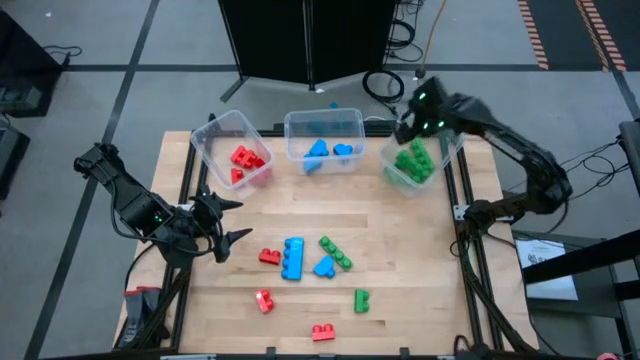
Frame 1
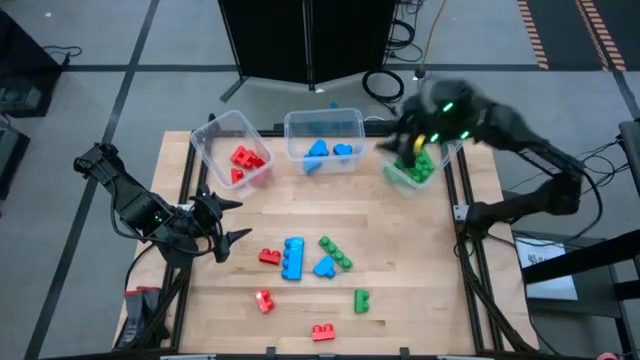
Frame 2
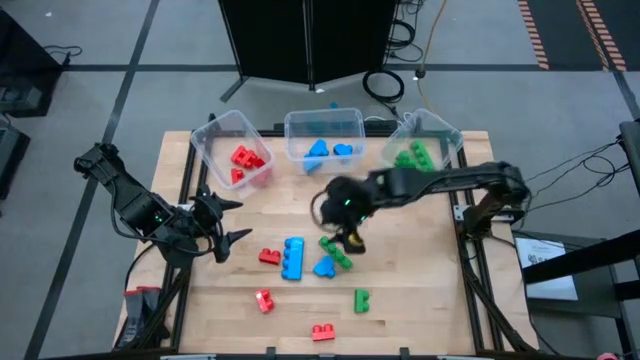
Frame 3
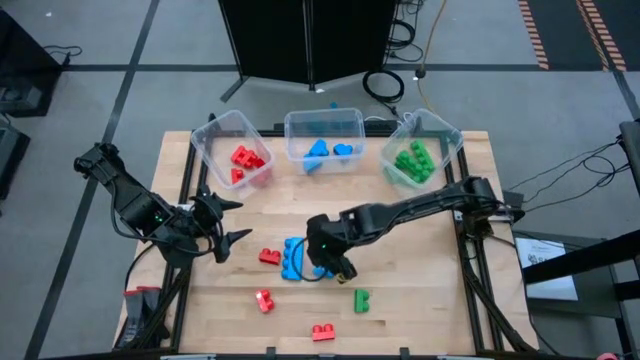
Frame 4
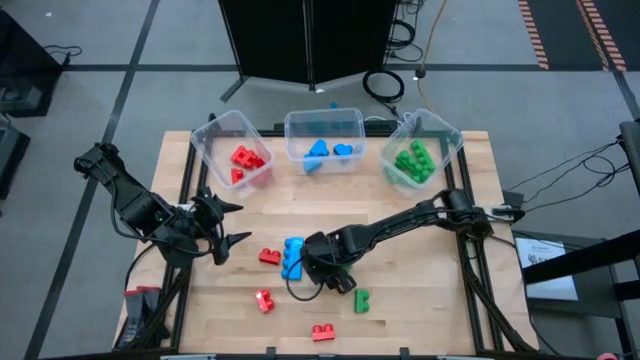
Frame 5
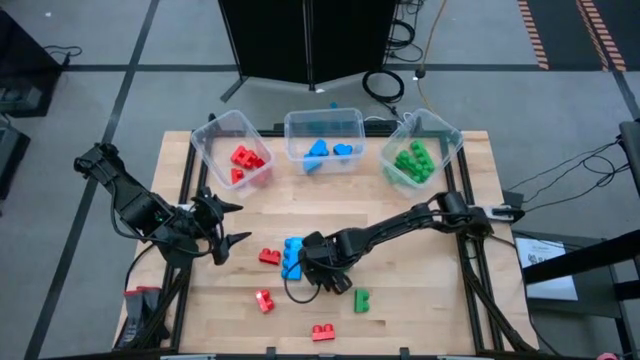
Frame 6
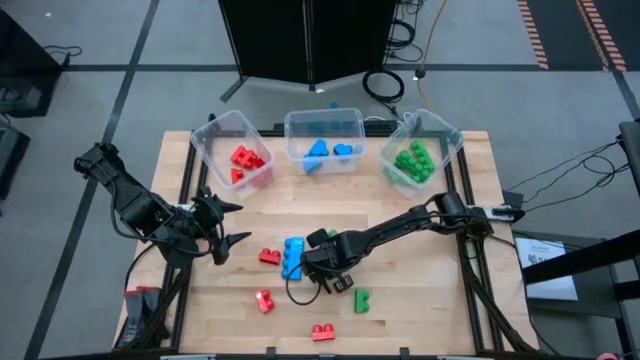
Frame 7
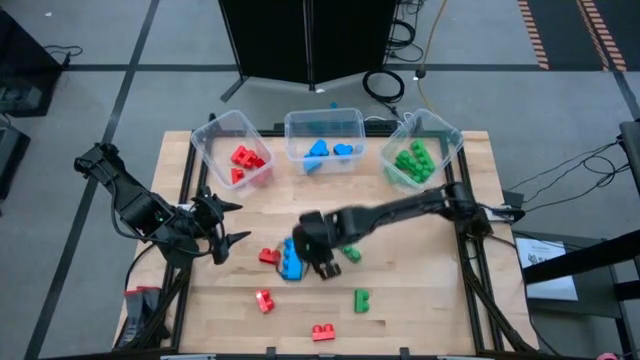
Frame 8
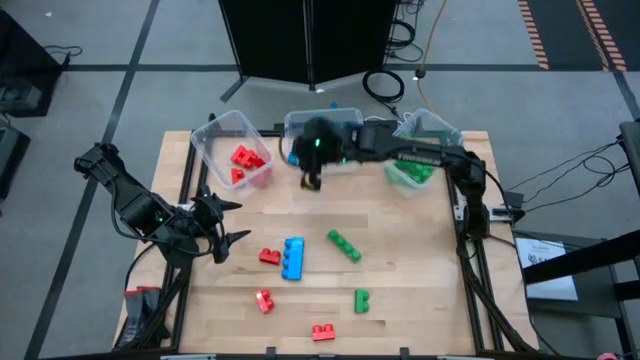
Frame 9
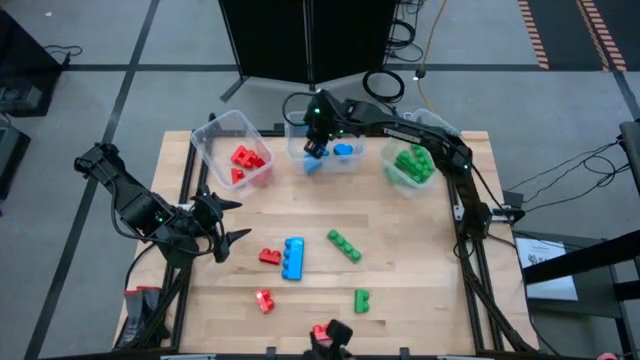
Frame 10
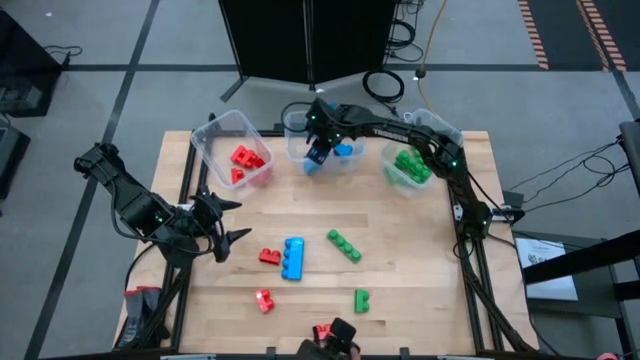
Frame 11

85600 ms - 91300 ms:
Task: Sort blocks
Put the blue game piece into the middle transparent bin

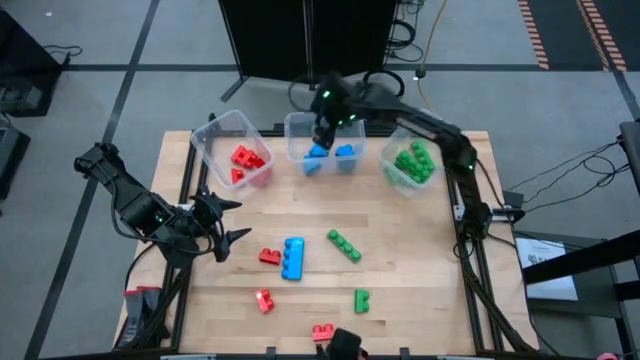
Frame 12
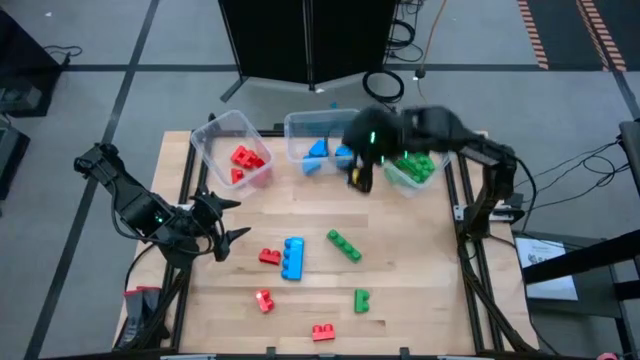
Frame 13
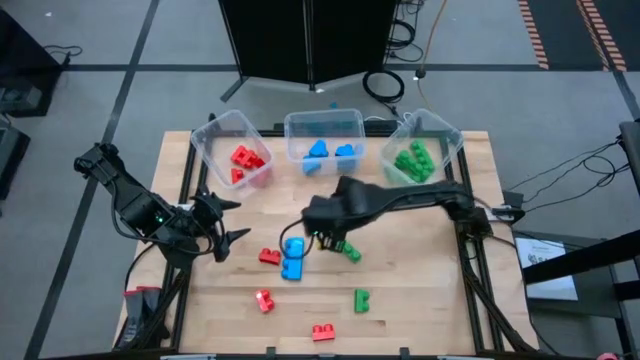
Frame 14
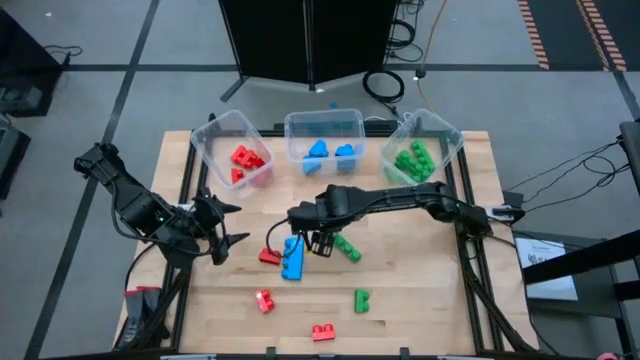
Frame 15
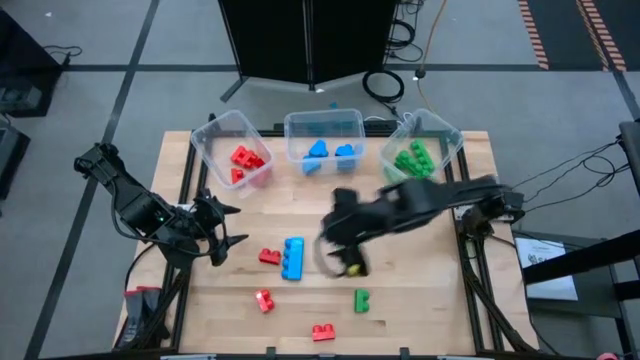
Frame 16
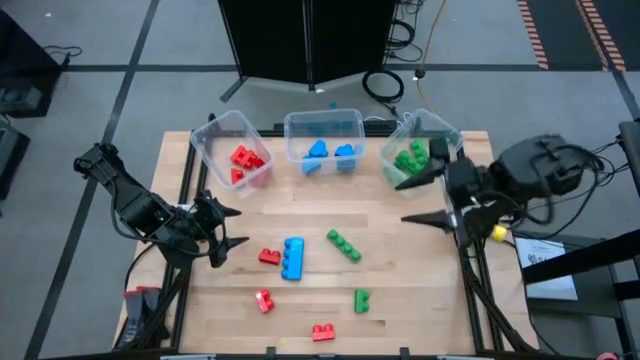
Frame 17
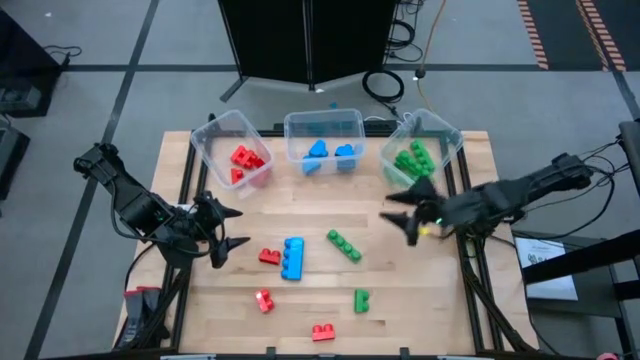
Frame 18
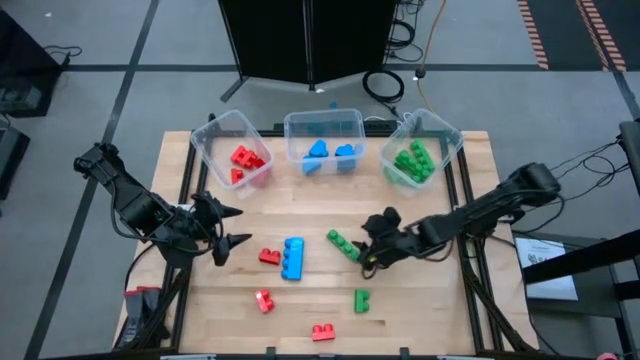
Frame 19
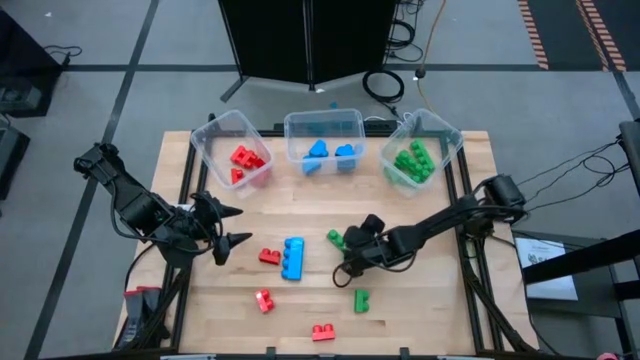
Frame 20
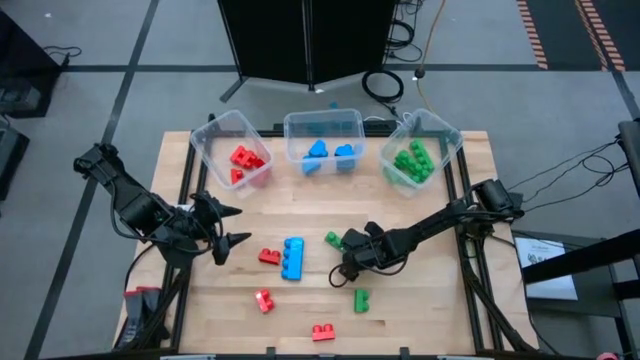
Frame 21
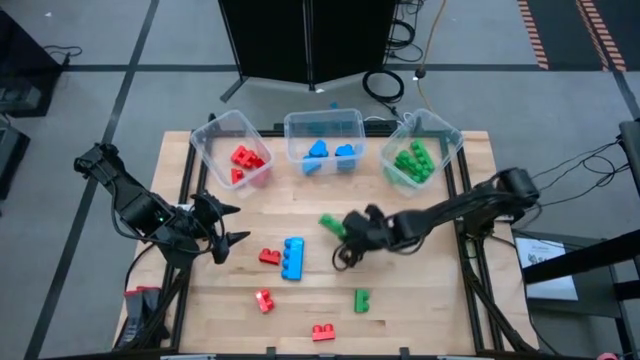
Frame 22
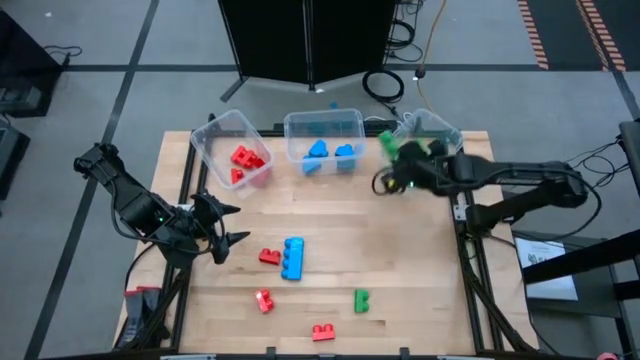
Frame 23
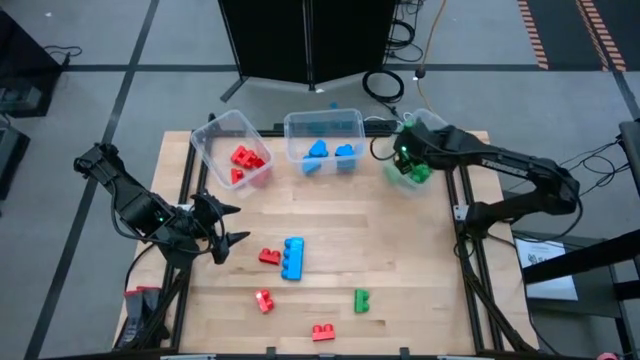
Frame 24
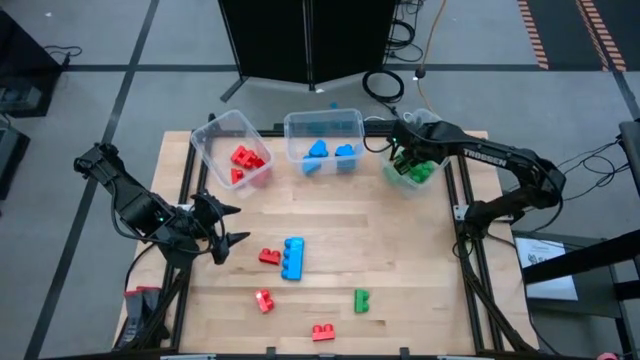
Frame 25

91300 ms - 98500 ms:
Put the green game piece into the right transparent bin

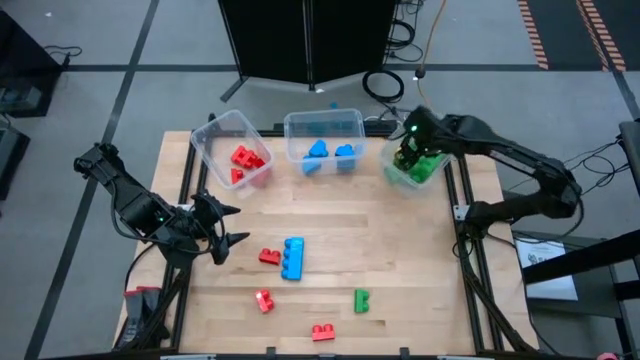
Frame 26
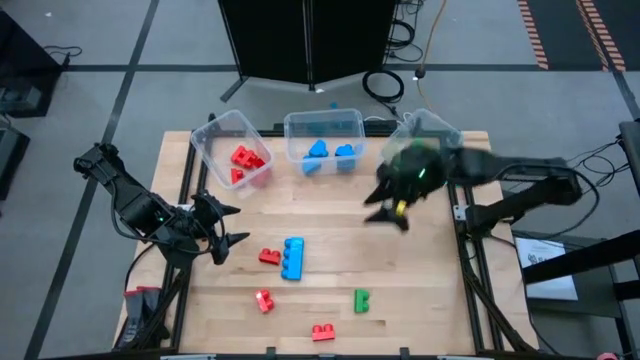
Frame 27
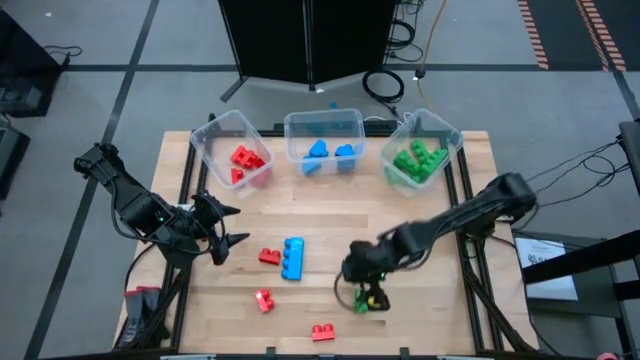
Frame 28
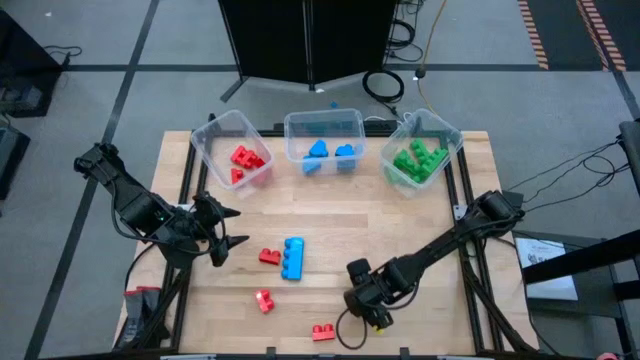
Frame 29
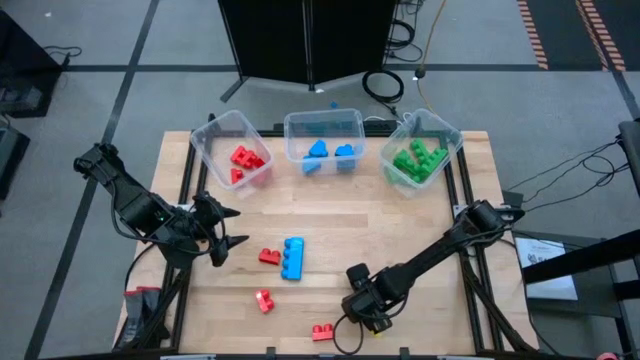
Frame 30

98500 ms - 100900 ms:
Put the green game piece into the right transparent bin

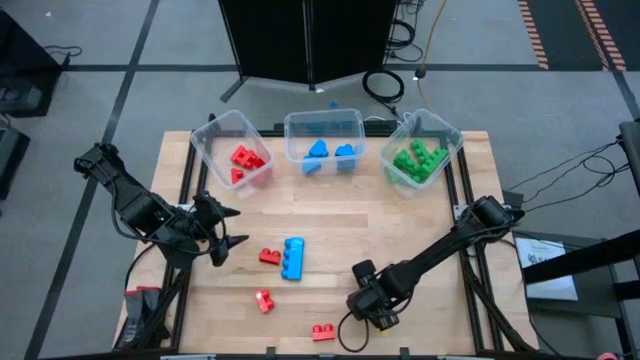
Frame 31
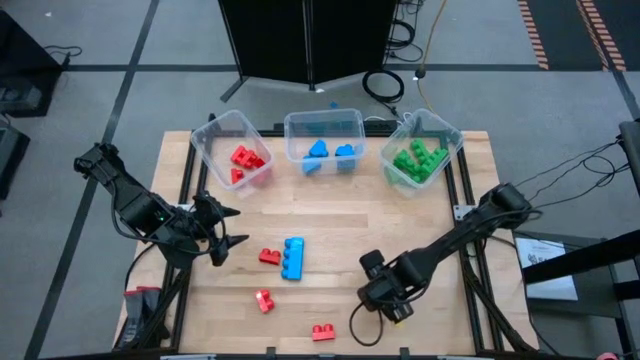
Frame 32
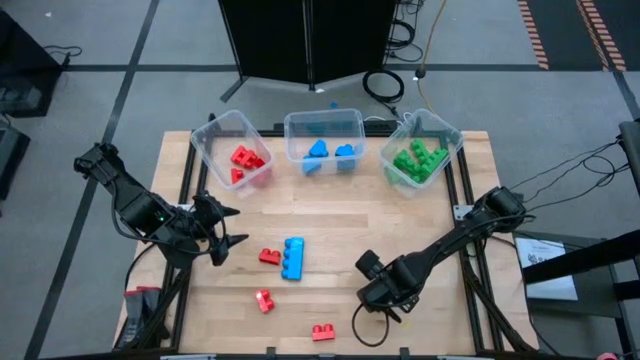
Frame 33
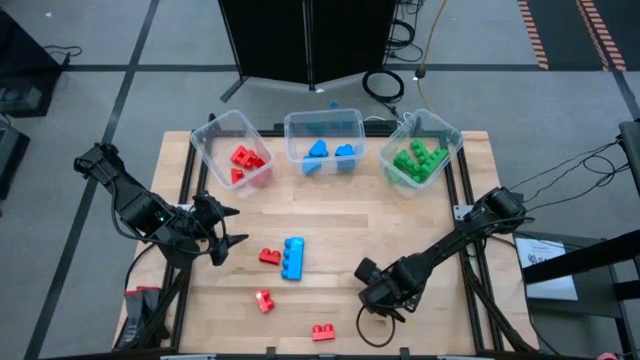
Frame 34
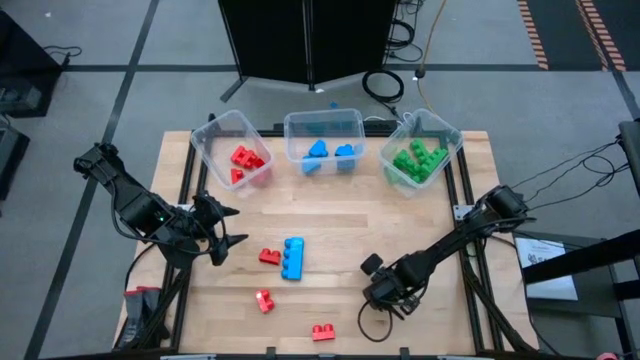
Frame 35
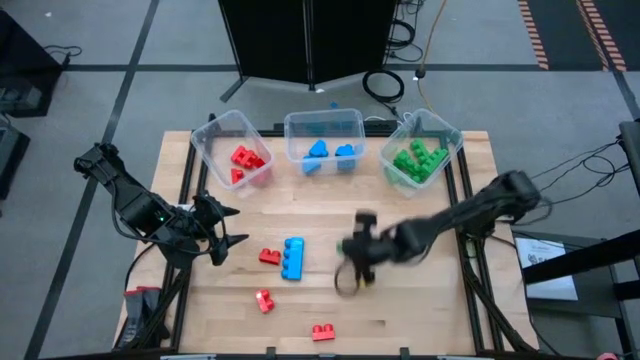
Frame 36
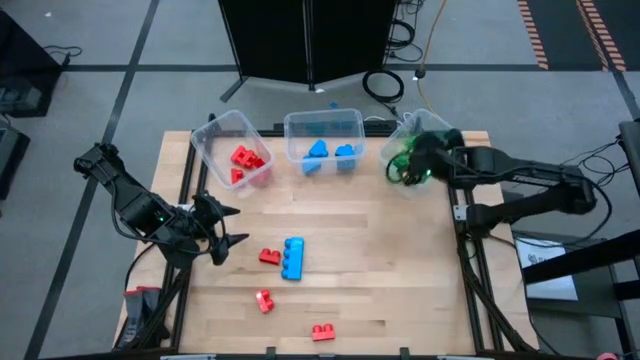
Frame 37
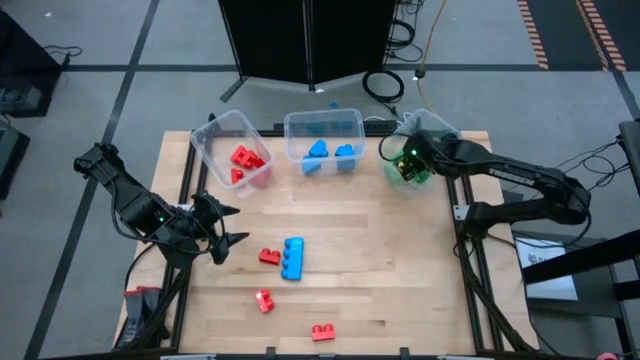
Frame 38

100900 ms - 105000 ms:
Put the green game piece into the right transparent bin

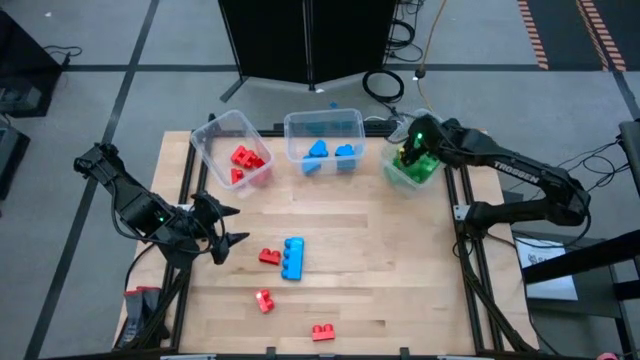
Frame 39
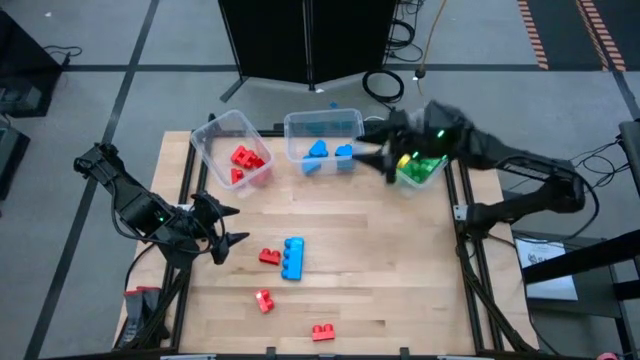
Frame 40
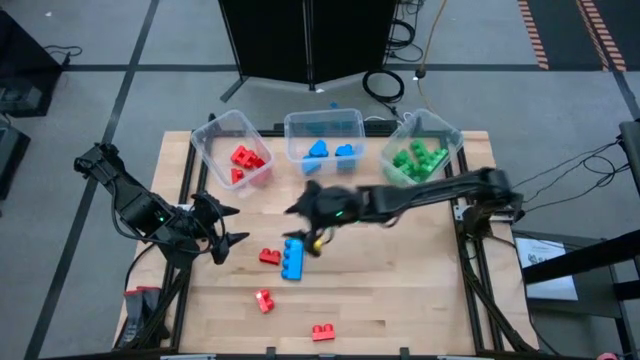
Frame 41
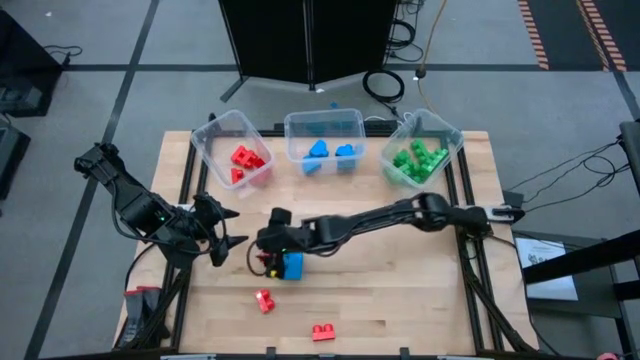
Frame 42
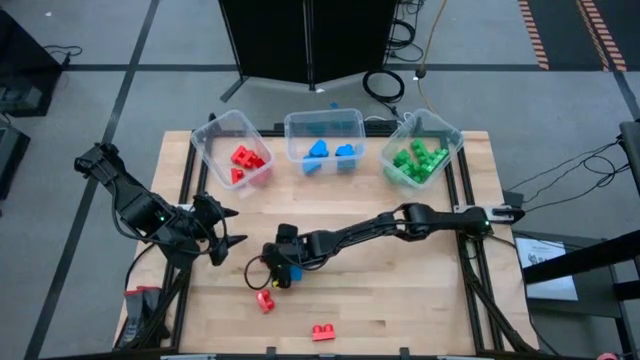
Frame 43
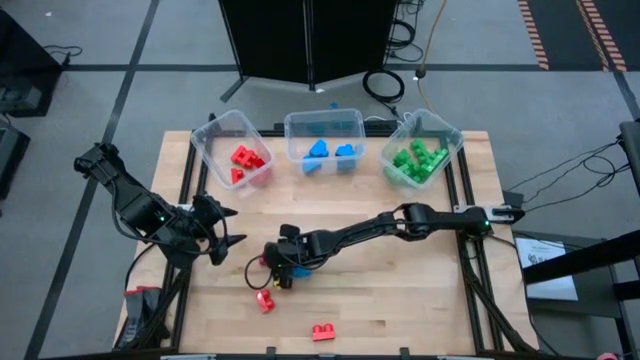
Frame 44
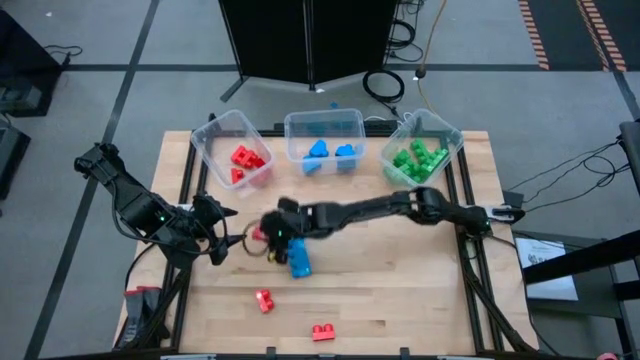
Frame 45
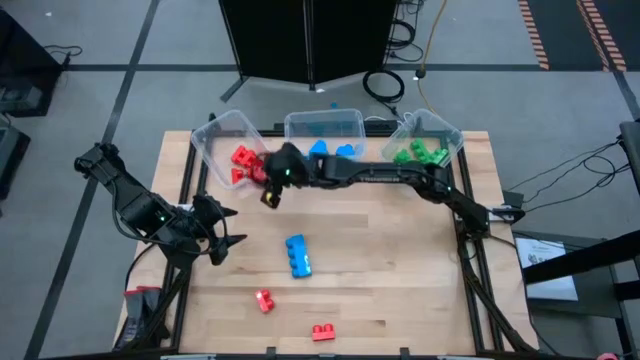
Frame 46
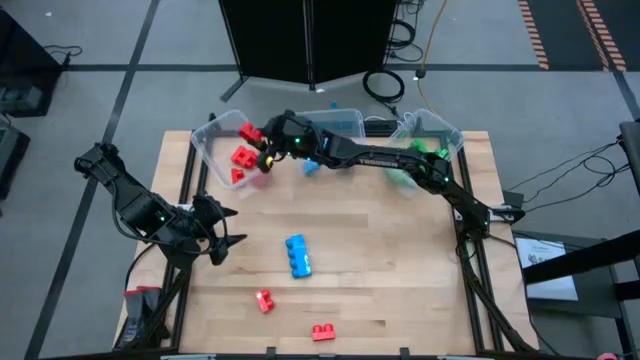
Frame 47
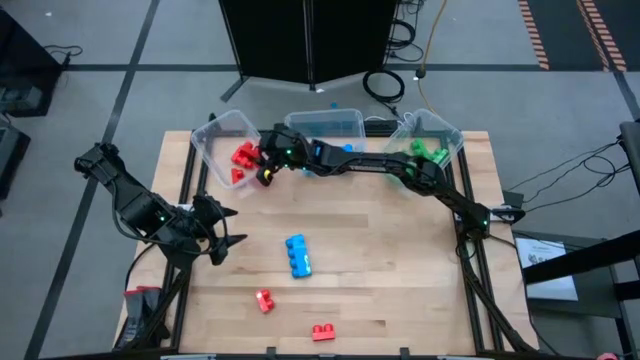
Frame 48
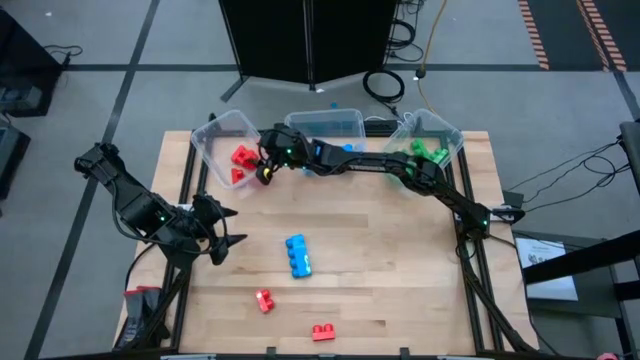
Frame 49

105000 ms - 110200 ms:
Put the red game piece into the left transparent bin
